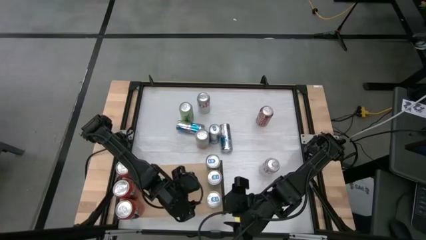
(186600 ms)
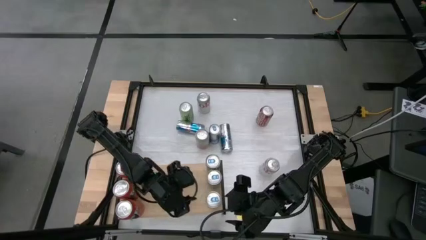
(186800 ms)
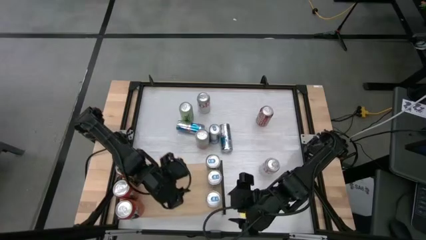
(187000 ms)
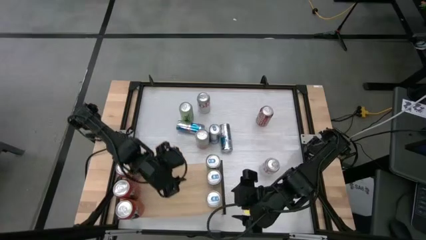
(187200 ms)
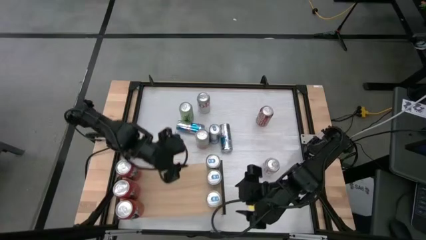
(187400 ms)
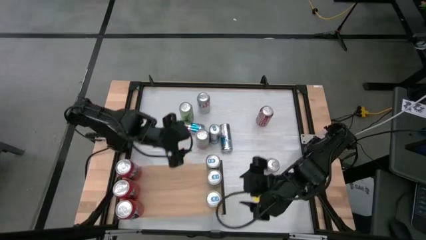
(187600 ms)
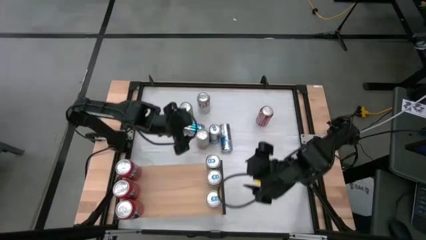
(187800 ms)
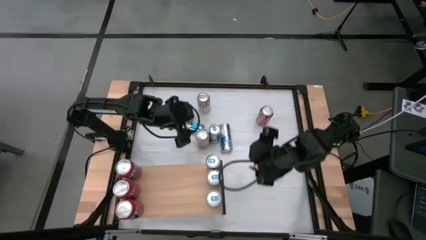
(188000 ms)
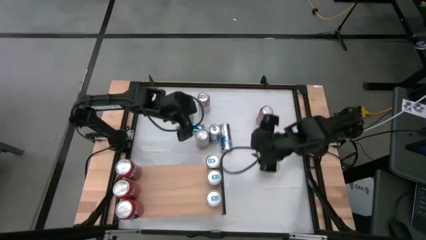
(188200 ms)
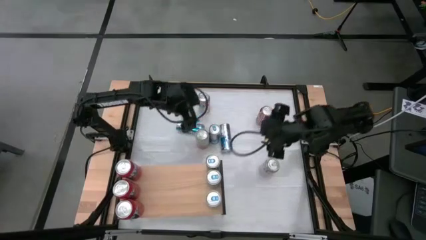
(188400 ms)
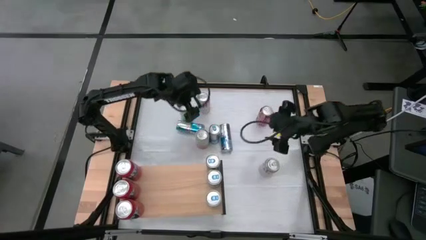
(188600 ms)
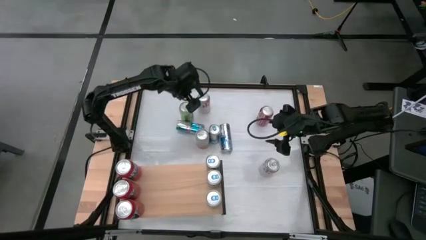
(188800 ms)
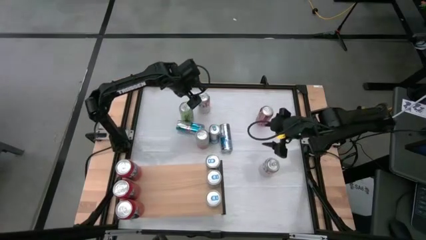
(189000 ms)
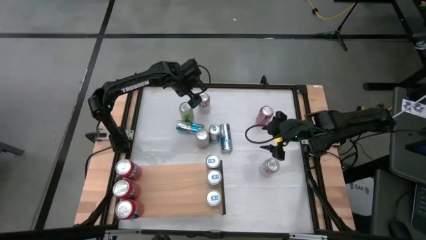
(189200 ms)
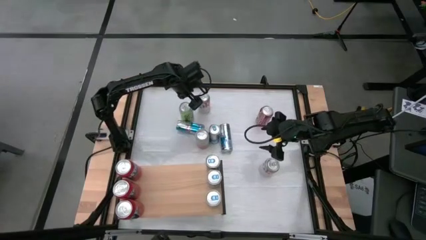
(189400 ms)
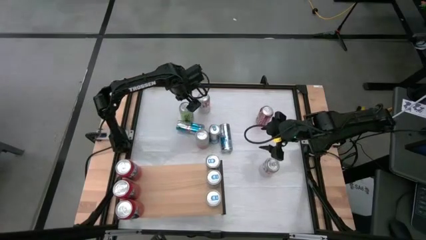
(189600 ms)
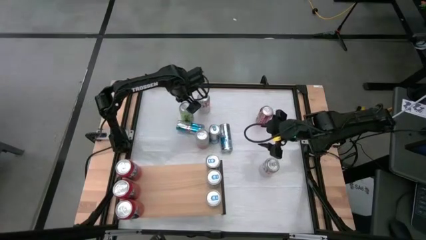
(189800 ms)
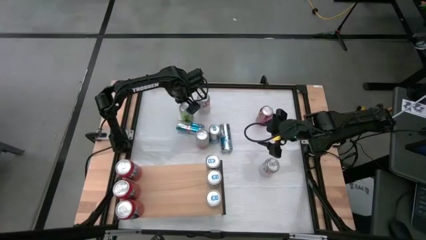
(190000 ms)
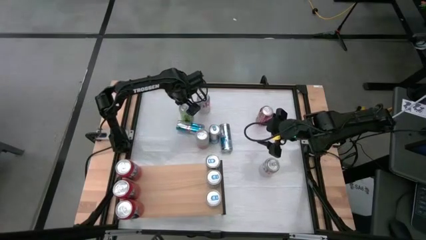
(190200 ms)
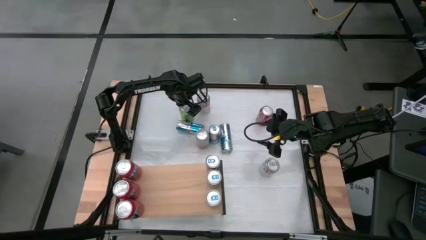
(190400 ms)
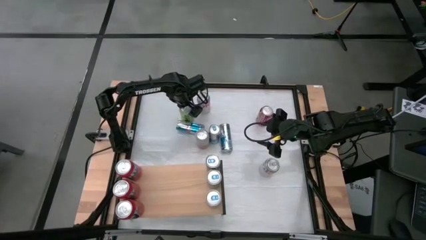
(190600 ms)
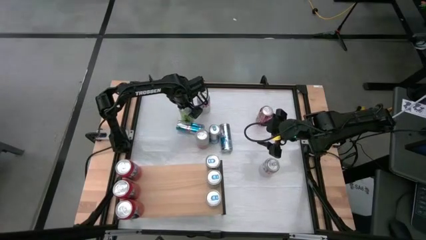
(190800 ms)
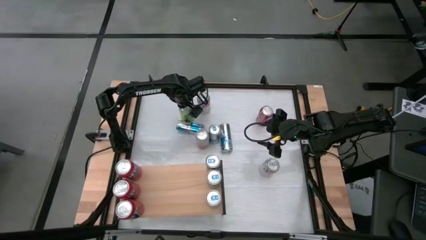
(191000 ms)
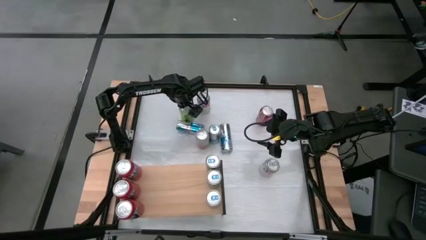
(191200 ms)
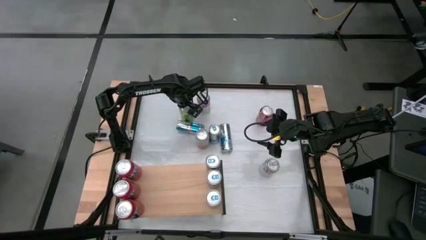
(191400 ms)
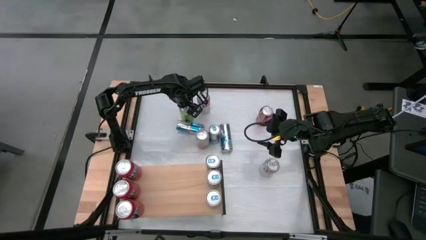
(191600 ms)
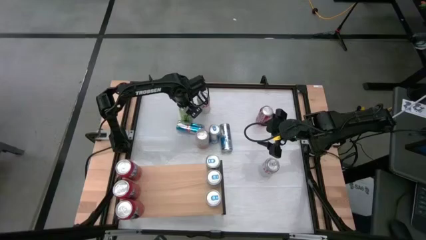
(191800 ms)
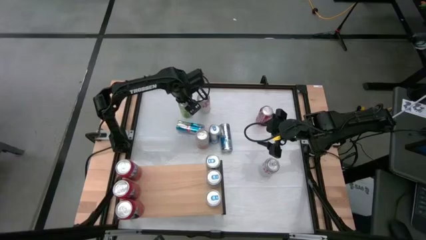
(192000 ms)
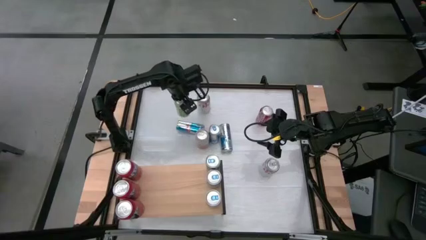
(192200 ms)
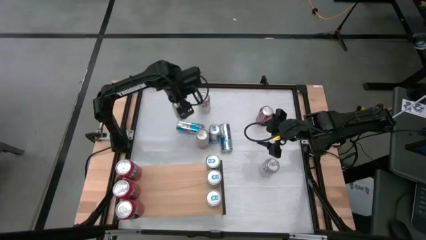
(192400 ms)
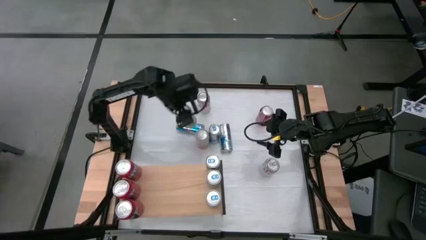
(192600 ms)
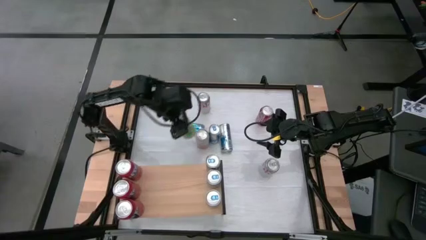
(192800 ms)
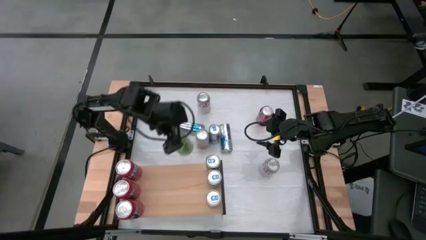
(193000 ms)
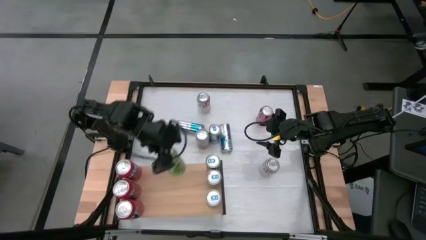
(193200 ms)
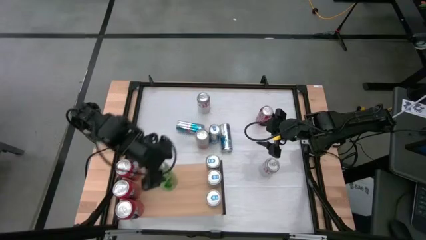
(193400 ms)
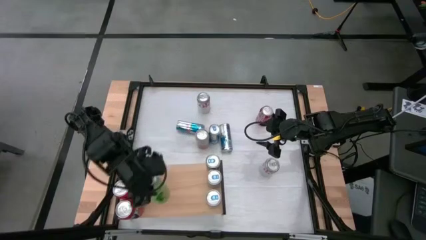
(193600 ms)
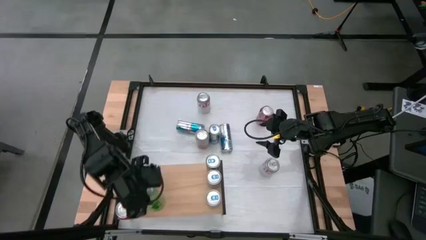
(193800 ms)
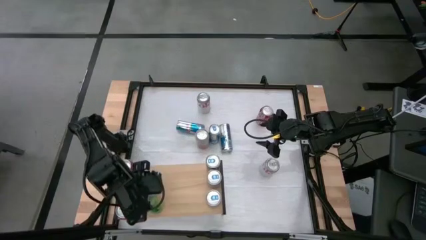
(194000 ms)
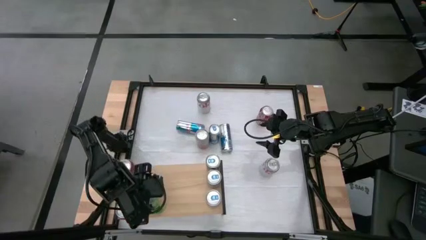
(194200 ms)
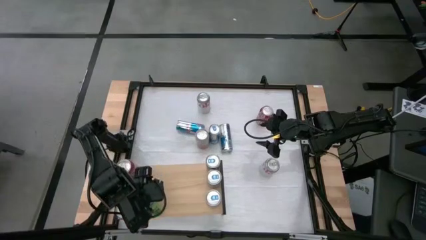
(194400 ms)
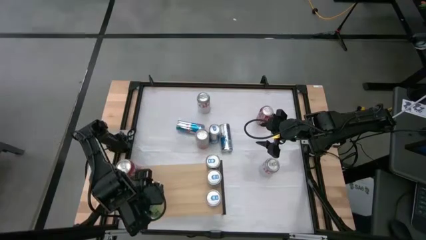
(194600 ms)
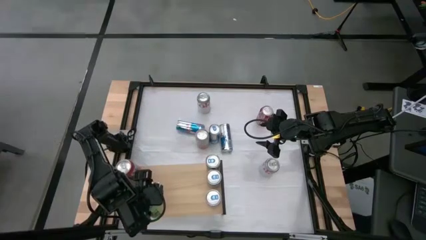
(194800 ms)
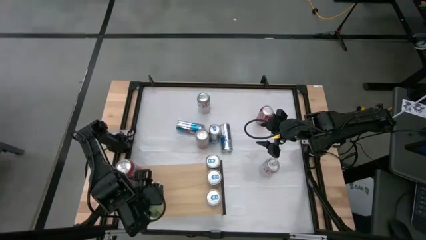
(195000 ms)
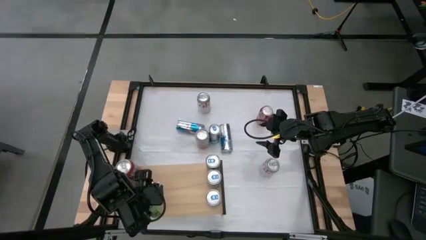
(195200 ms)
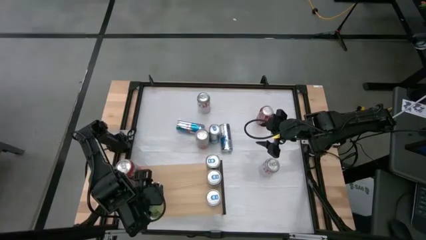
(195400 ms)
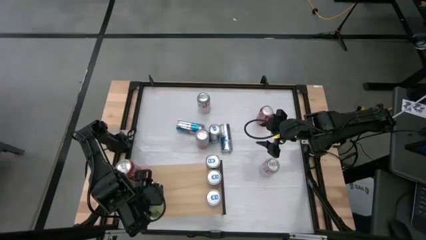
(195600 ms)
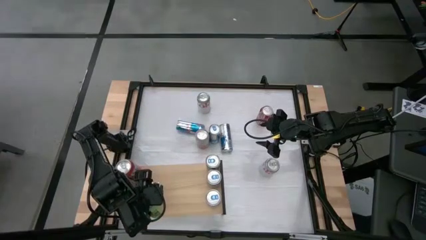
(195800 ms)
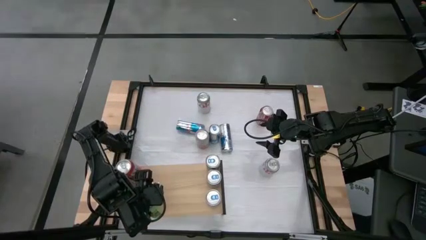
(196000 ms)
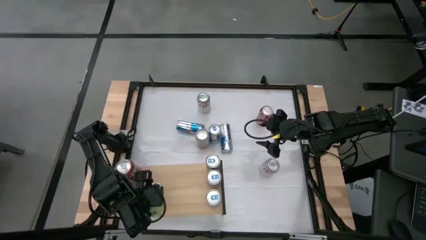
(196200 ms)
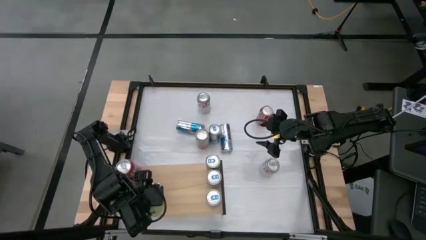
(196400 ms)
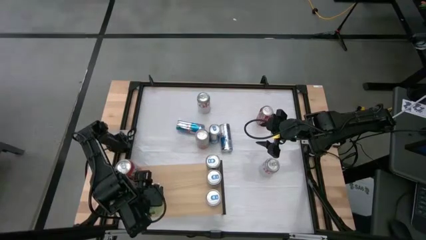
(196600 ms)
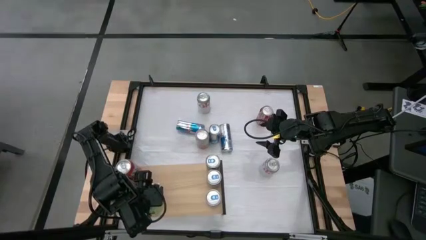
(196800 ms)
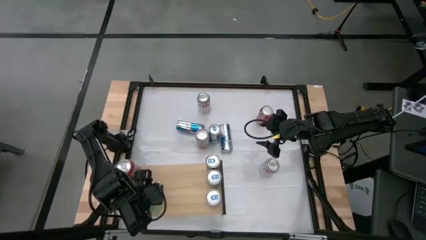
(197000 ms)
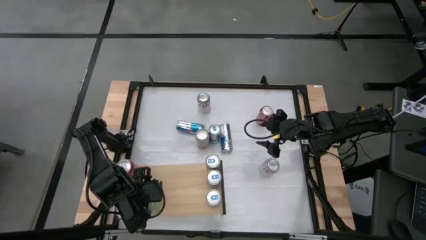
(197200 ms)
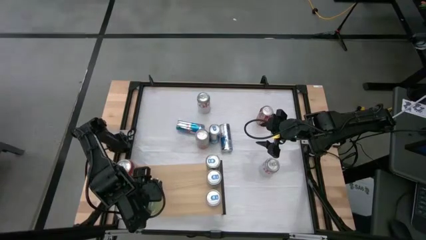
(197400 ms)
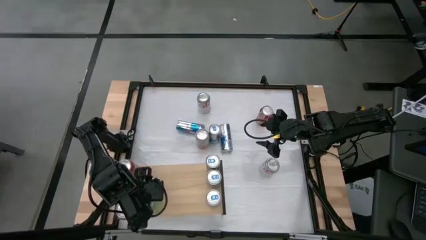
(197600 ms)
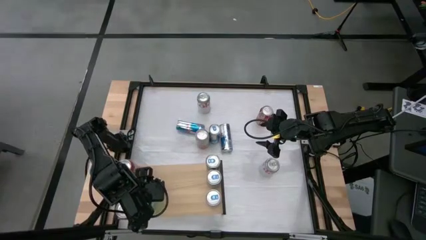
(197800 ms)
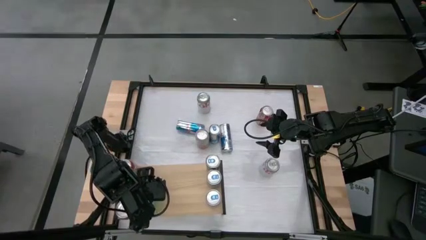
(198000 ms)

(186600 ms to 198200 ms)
Task: Place canned beverage on shelf
Put the green soda can on the shelf

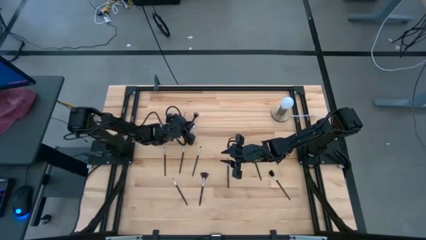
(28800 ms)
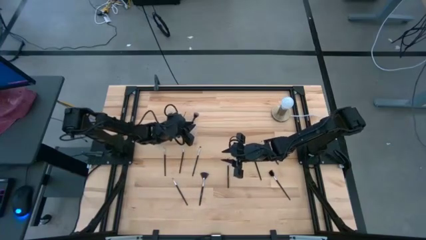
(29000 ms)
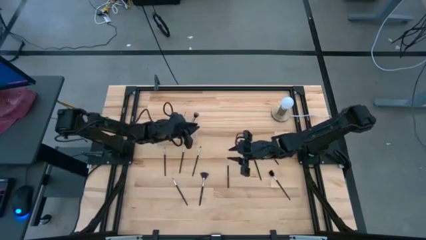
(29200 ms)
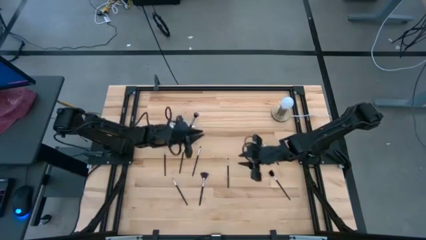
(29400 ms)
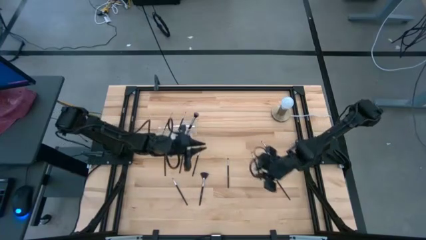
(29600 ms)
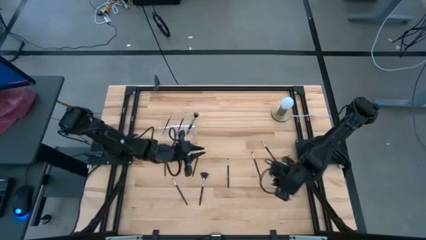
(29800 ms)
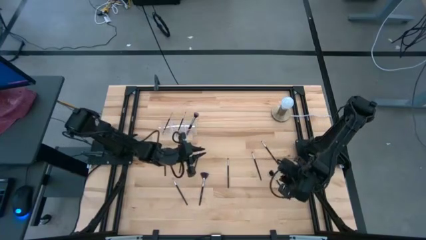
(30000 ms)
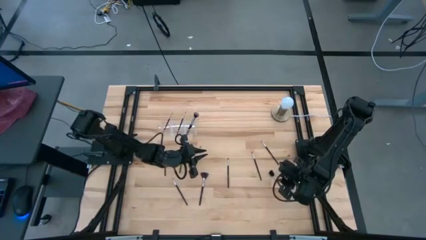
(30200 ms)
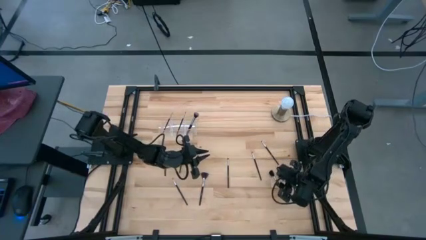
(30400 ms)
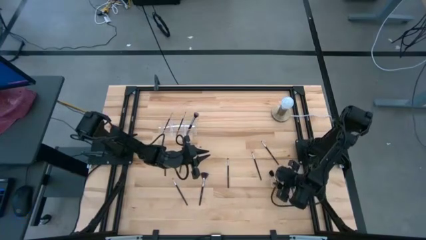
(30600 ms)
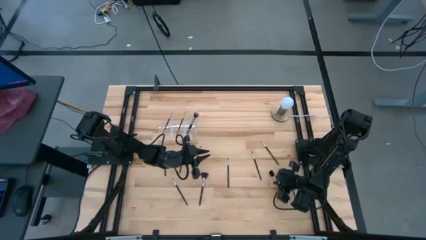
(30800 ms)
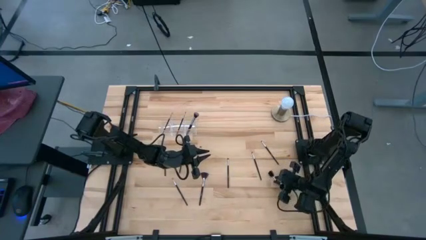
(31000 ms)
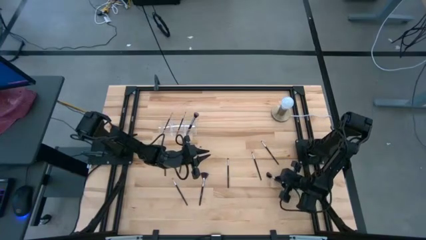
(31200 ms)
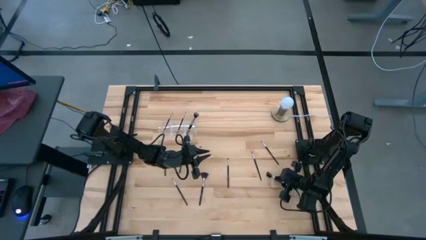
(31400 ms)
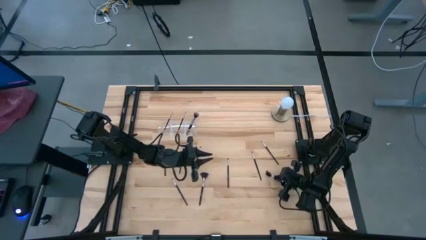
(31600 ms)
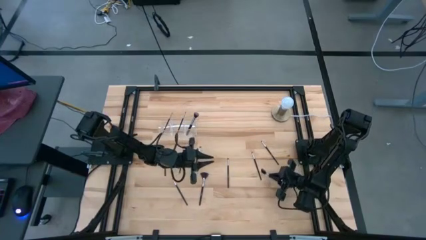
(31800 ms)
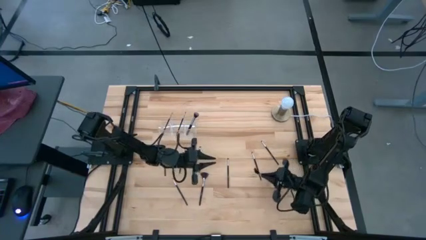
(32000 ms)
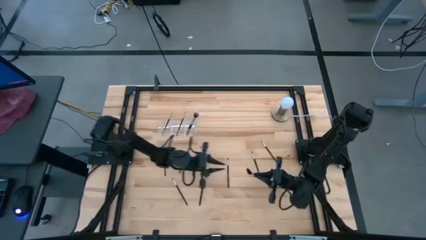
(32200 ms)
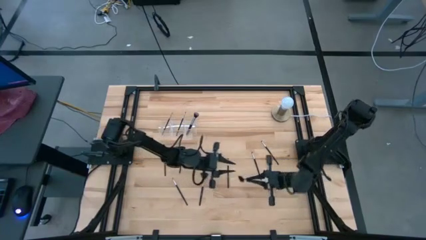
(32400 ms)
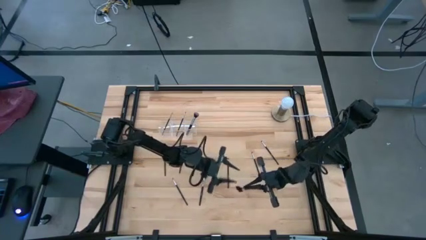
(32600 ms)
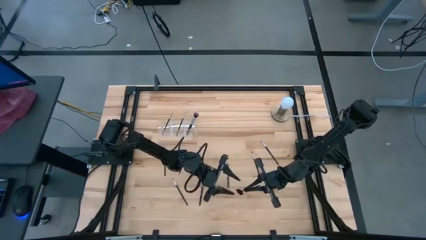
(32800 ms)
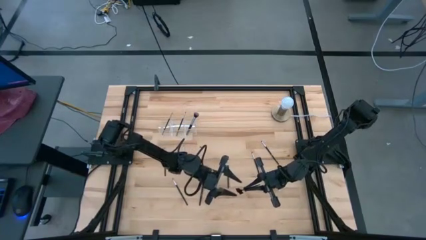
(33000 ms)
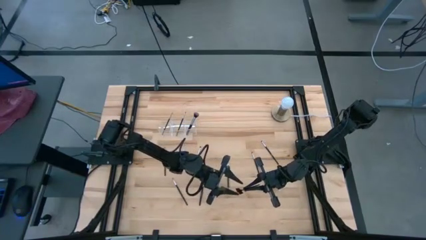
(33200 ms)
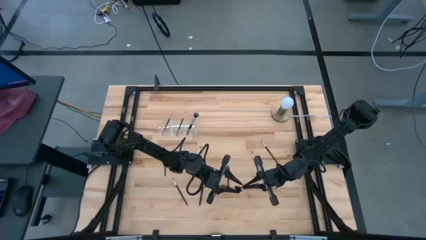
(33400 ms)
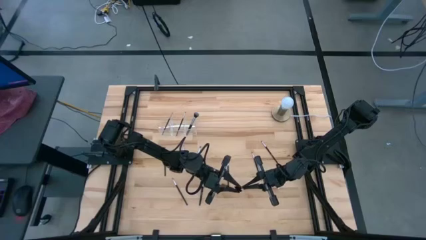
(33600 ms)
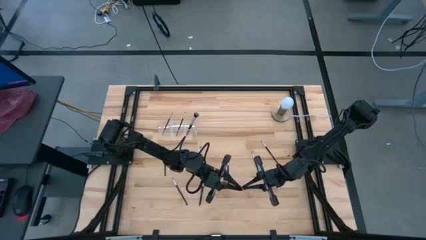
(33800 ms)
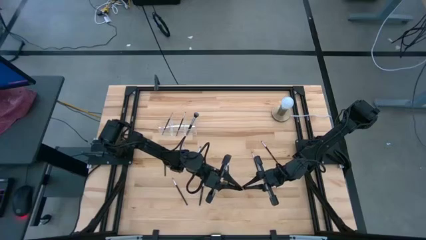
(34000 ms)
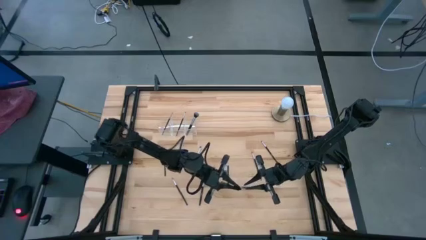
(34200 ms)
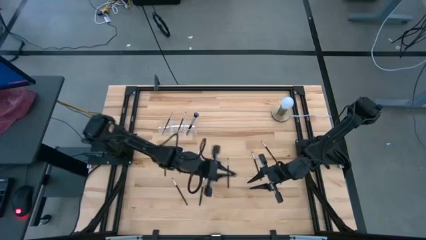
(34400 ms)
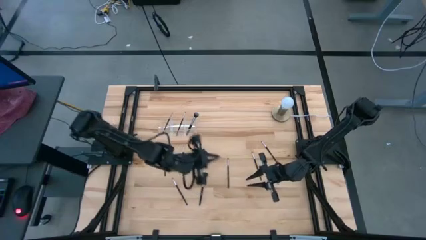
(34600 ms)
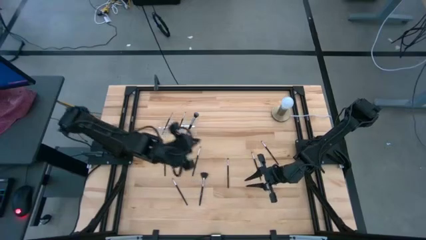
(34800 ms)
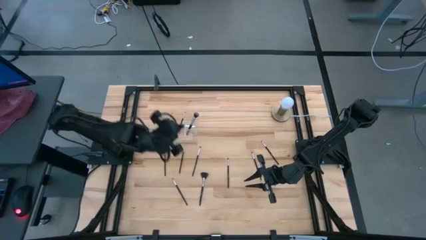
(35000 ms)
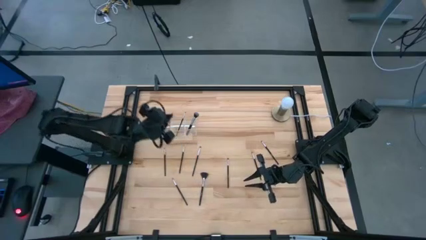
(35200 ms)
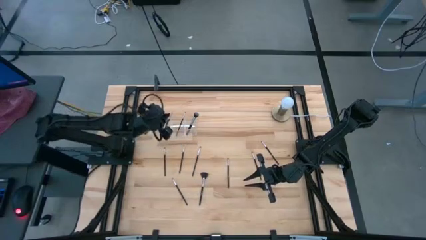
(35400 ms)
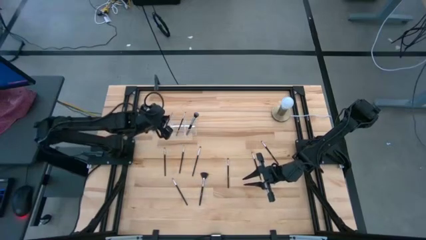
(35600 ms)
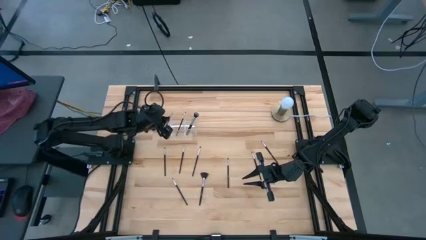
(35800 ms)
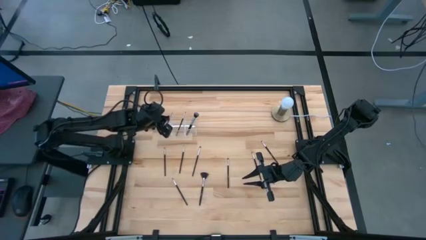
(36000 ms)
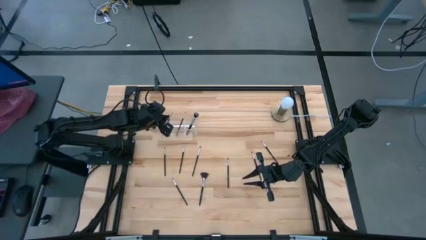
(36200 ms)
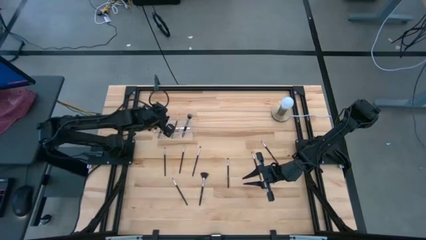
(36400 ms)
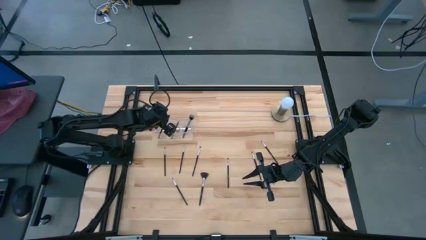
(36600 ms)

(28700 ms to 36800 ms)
Task: Pick & Place Makeup Brushes
Put the black brow brush into the transparent organizer
